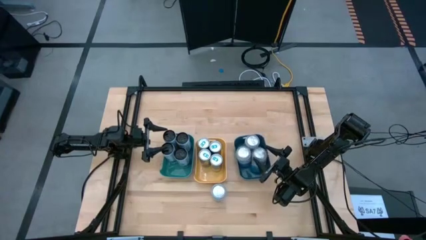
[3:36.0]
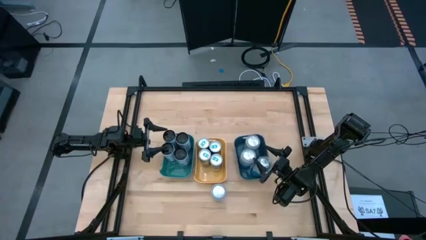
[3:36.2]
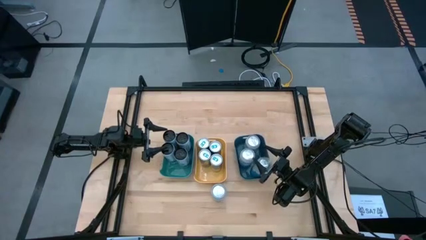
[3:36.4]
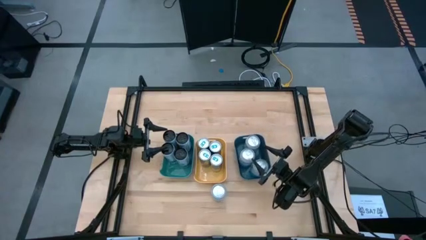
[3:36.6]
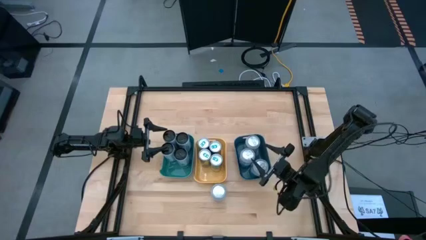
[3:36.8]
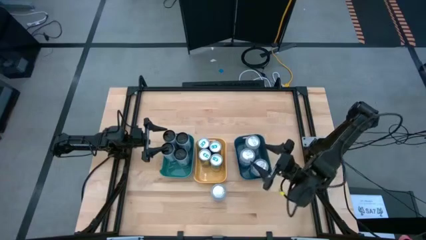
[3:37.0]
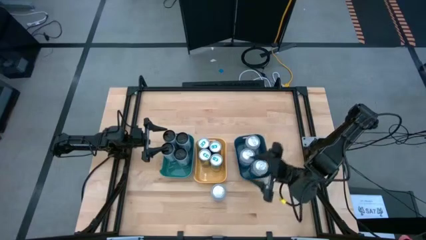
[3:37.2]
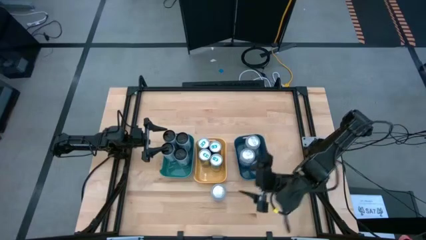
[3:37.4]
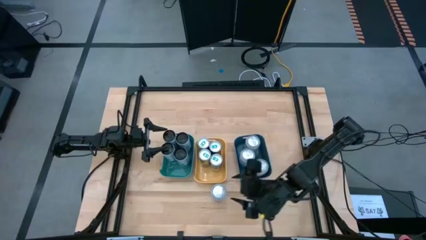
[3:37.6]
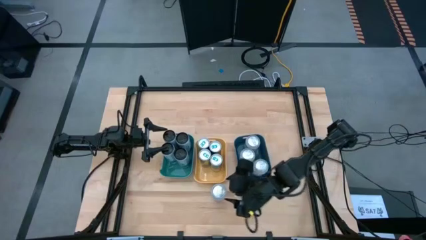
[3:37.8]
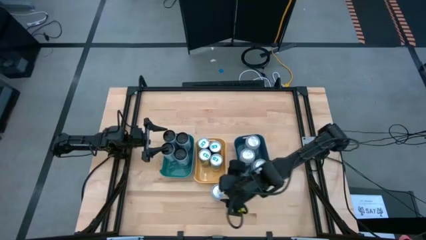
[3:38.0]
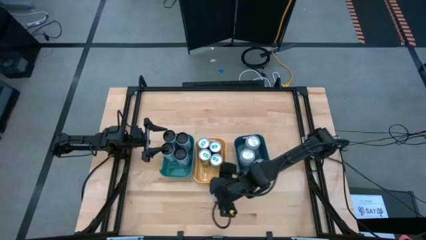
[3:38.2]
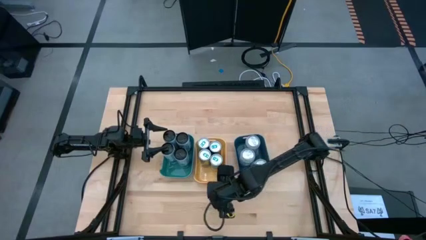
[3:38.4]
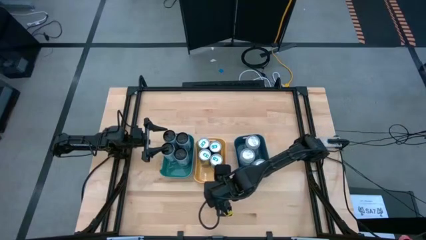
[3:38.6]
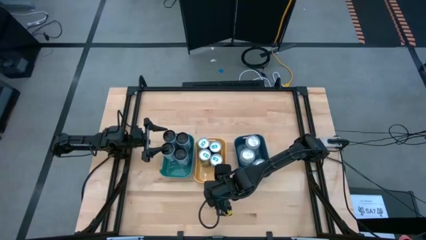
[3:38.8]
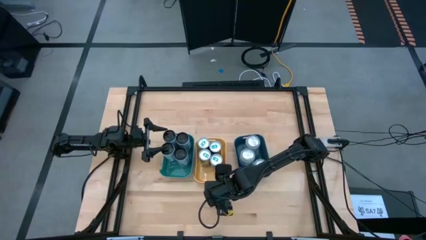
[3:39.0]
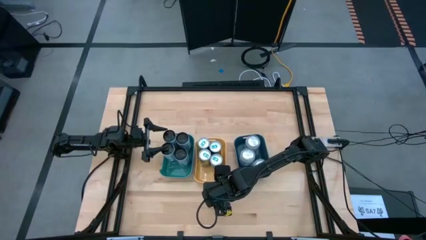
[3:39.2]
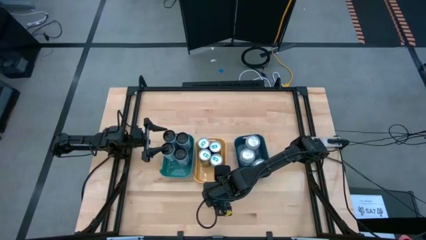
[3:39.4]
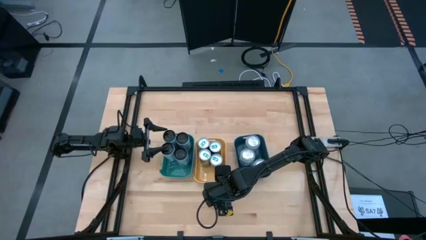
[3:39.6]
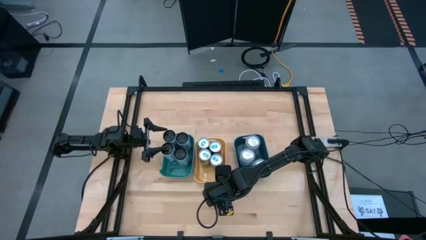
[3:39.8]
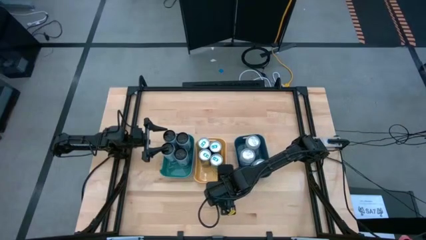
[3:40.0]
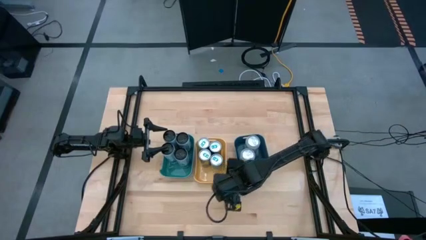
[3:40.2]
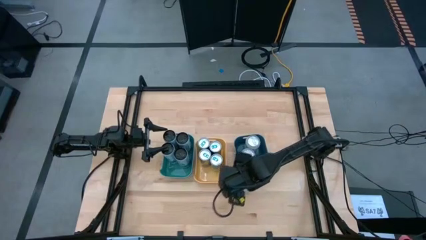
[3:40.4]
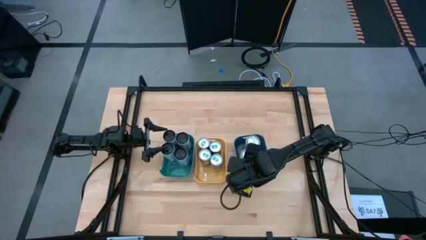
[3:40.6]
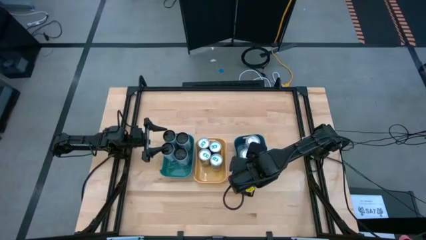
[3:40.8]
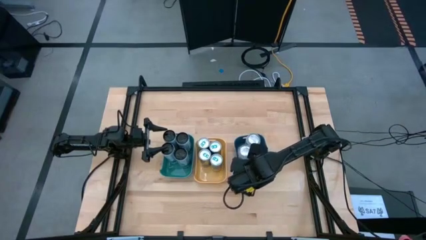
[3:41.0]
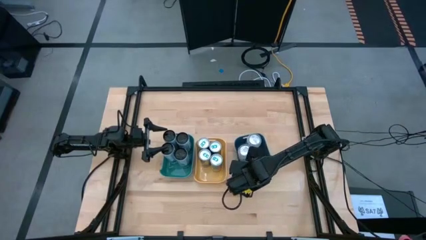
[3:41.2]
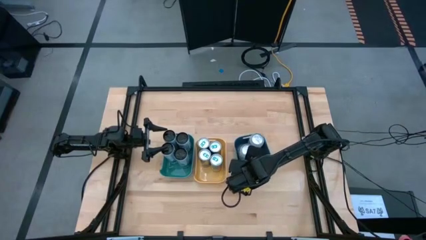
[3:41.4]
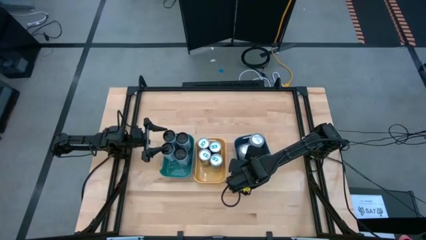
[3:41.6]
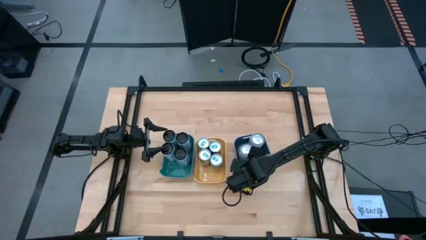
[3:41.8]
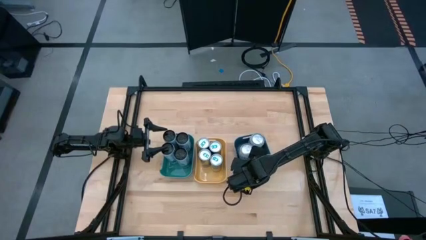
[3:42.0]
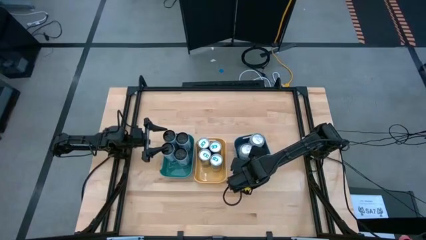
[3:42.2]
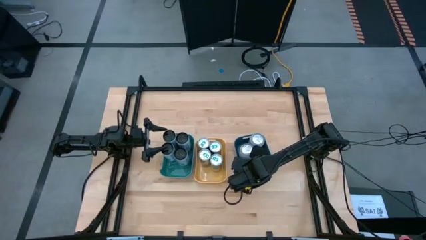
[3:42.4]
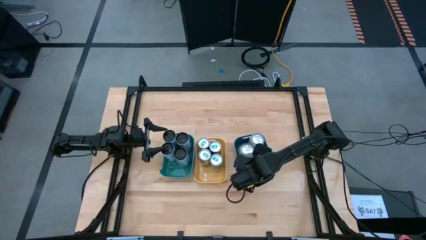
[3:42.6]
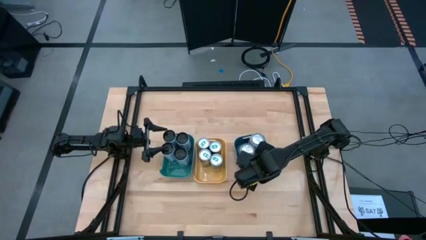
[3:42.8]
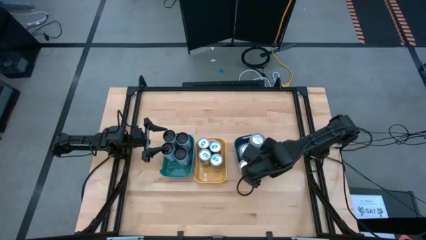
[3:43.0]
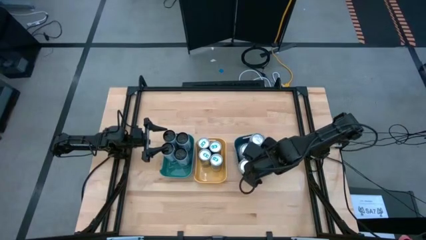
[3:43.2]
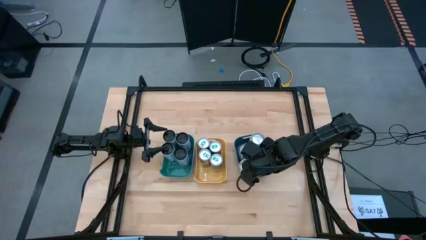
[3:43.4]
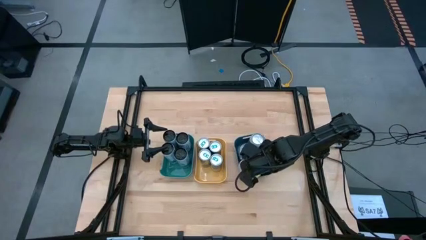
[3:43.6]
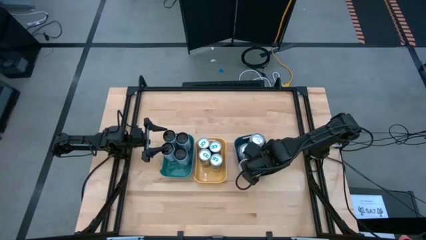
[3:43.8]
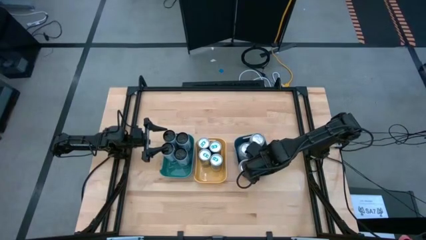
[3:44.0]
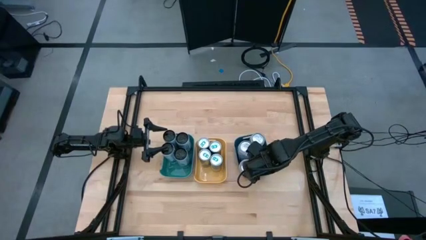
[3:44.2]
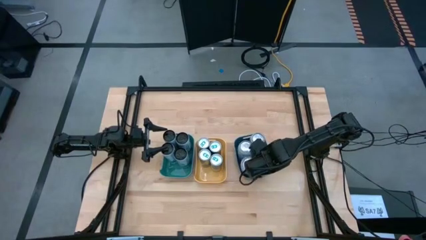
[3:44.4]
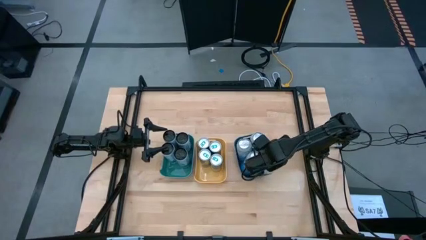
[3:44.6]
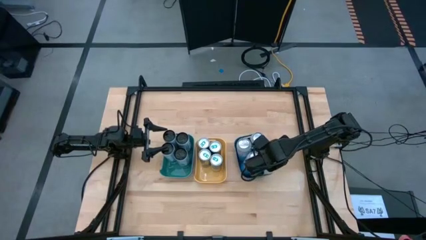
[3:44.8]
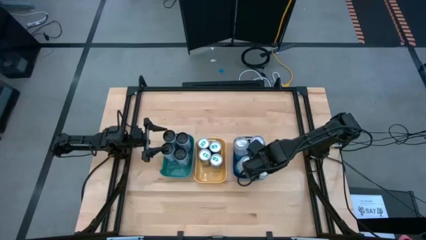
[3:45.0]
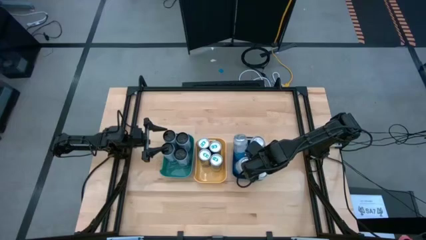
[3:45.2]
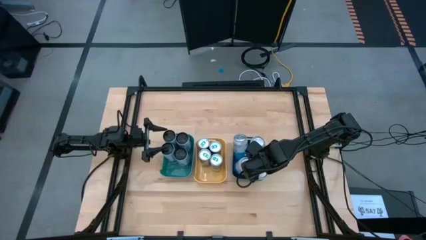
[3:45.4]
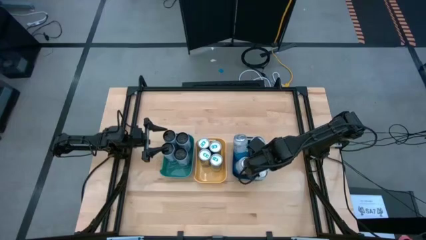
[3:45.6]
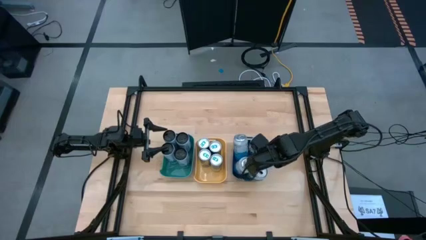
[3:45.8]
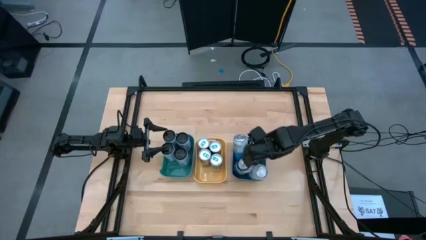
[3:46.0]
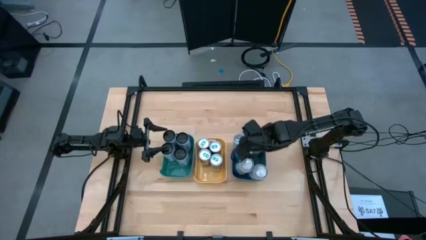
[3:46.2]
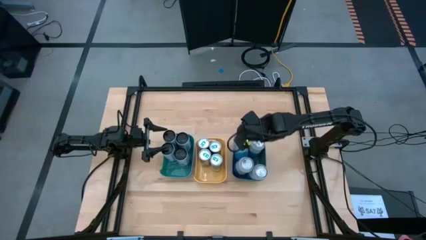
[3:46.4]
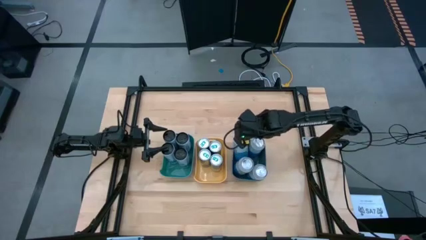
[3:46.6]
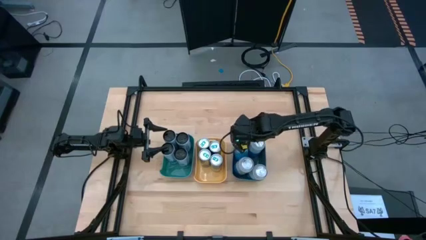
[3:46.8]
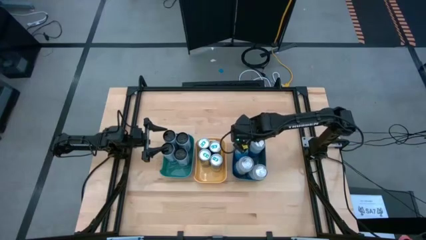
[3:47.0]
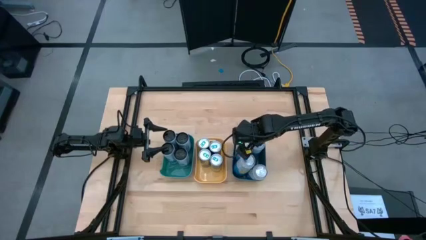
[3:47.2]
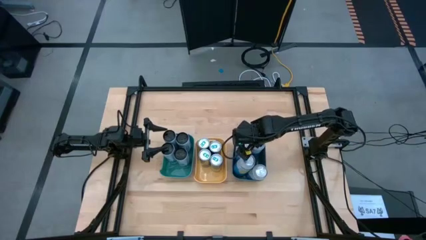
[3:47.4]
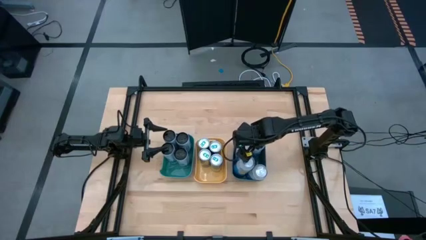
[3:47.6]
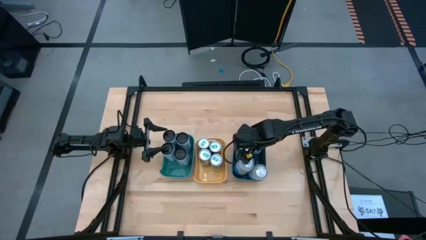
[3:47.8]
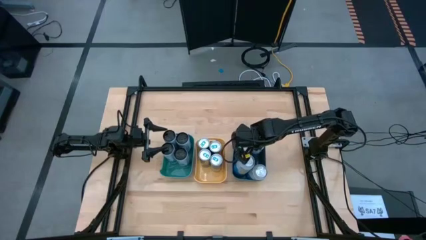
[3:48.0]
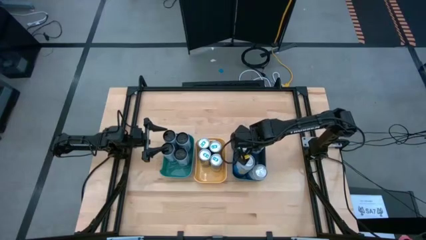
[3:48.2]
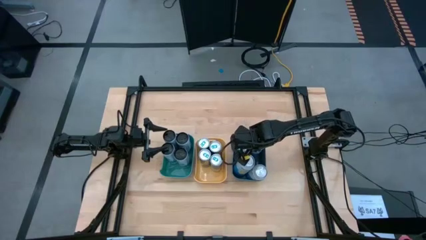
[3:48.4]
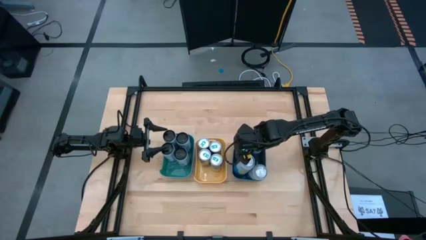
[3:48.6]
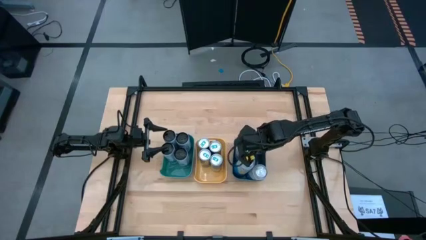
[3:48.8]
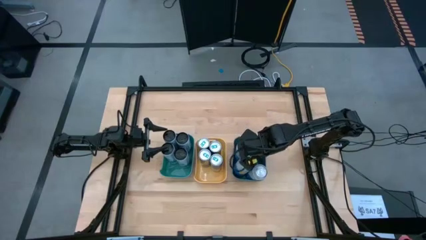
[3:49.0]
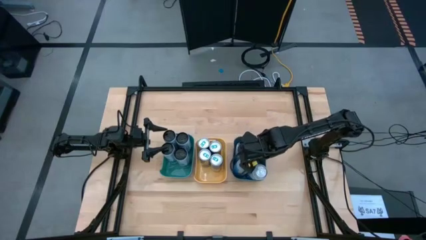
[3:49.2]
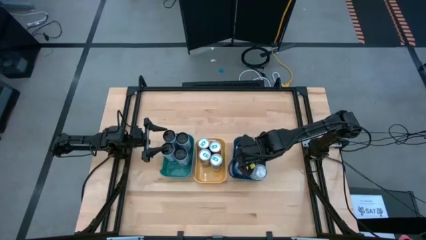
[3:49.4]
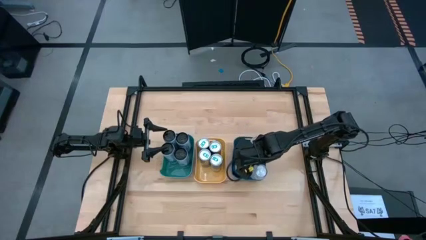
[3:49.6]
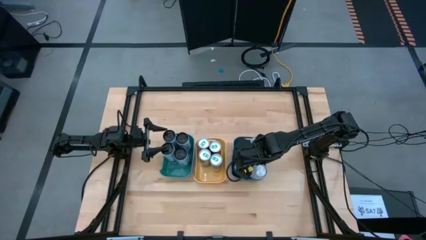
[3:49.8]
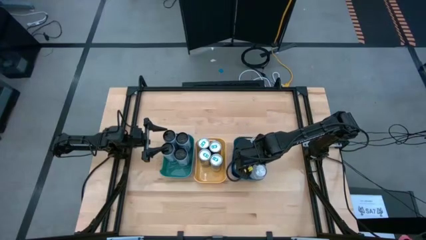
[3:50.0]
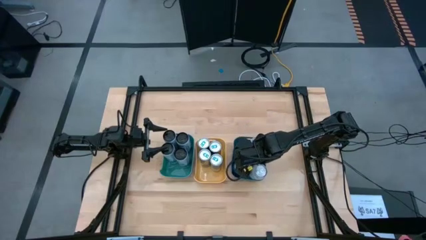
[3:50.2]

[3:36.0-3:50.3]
Task: Sort soda cans
Put the bottom silver can into the dark green bin and align the cans
